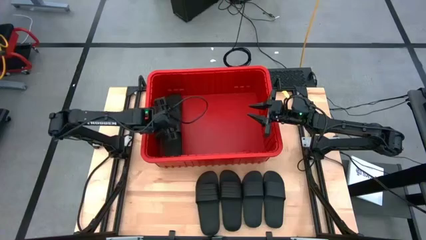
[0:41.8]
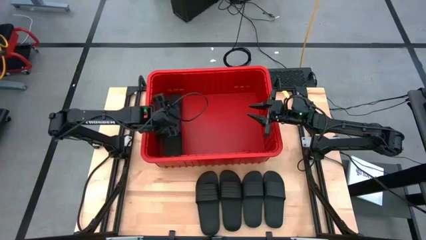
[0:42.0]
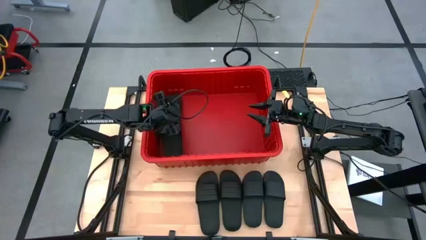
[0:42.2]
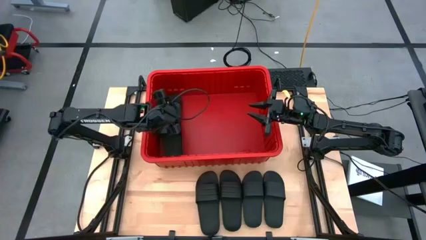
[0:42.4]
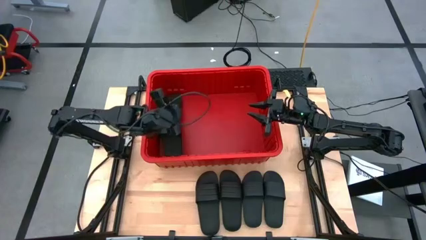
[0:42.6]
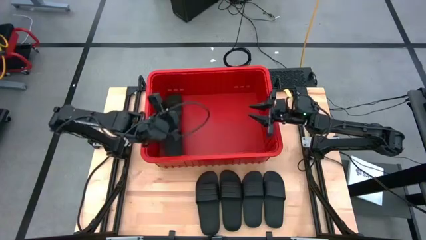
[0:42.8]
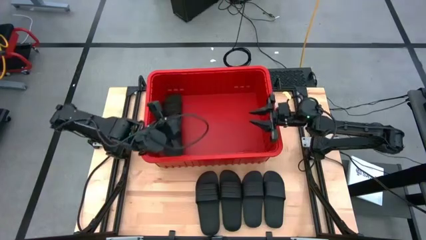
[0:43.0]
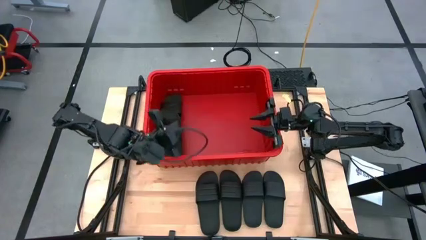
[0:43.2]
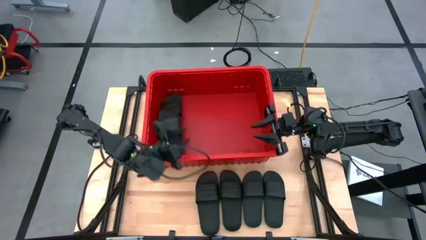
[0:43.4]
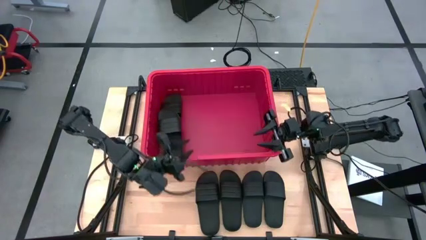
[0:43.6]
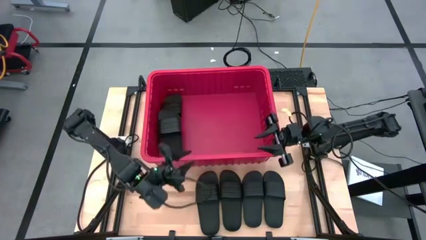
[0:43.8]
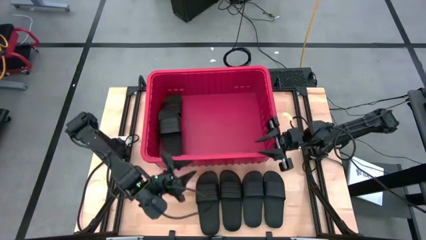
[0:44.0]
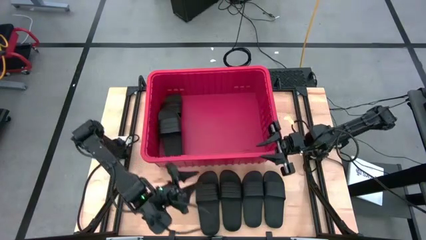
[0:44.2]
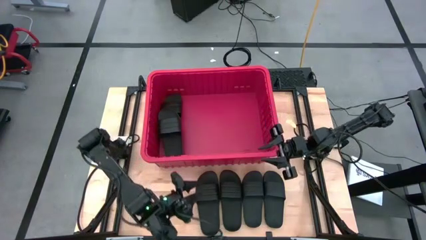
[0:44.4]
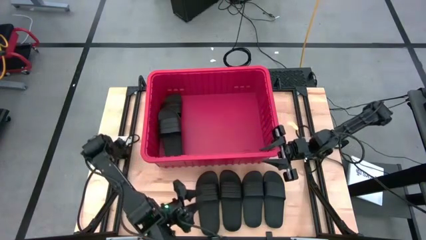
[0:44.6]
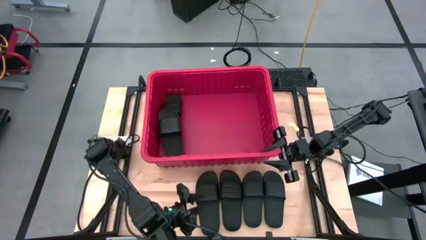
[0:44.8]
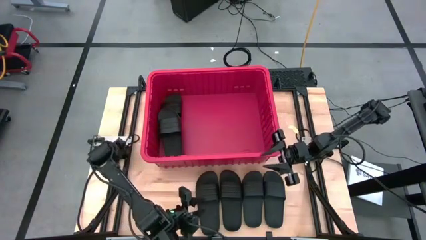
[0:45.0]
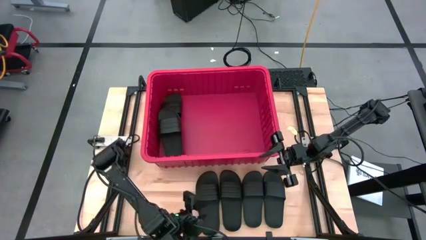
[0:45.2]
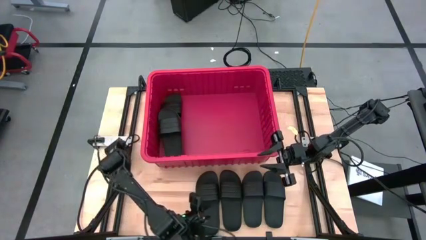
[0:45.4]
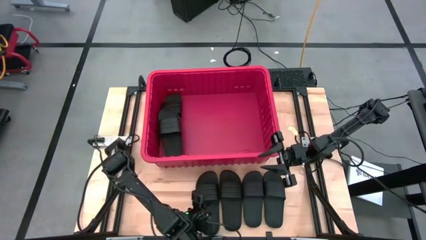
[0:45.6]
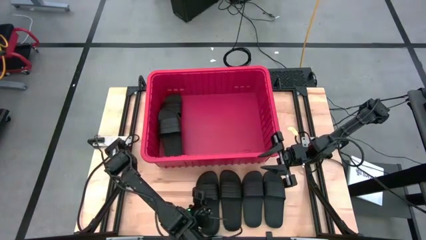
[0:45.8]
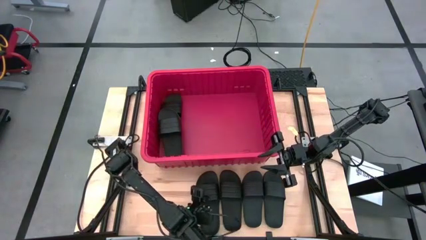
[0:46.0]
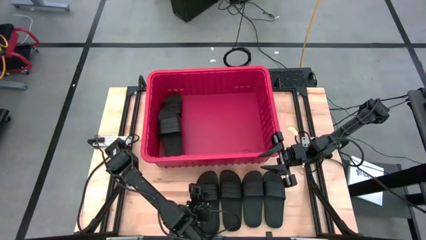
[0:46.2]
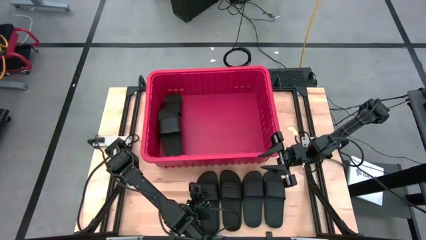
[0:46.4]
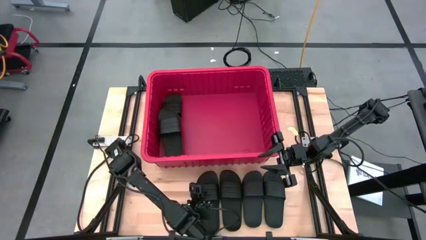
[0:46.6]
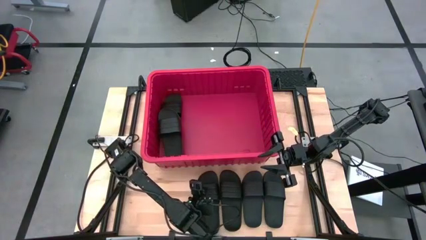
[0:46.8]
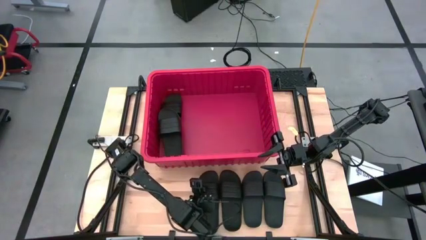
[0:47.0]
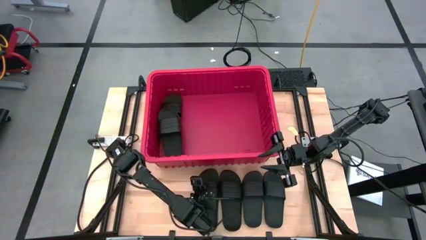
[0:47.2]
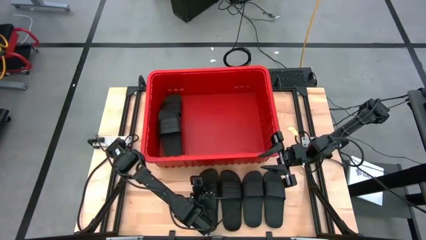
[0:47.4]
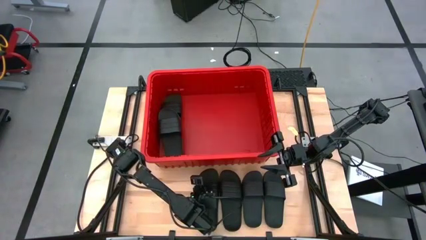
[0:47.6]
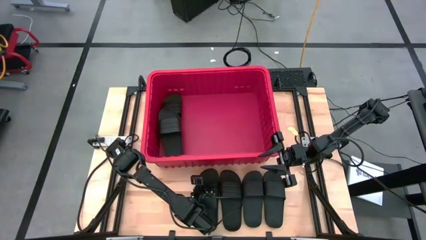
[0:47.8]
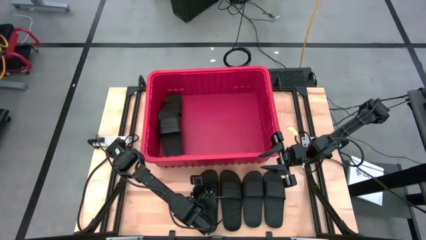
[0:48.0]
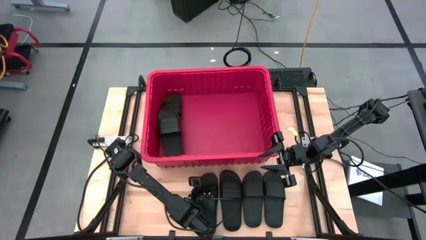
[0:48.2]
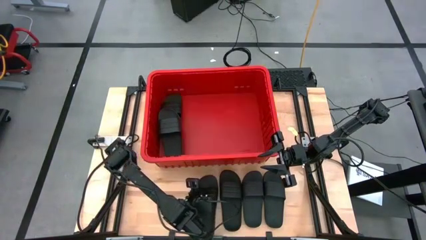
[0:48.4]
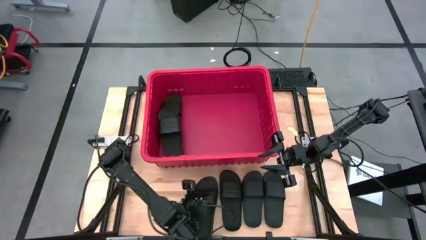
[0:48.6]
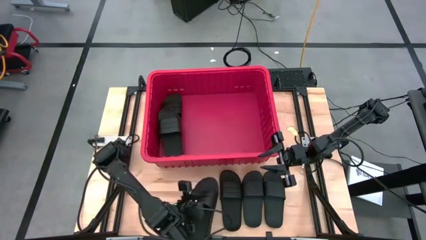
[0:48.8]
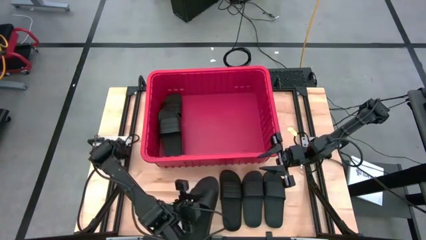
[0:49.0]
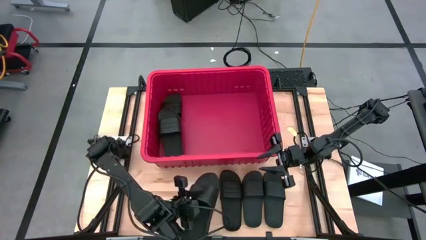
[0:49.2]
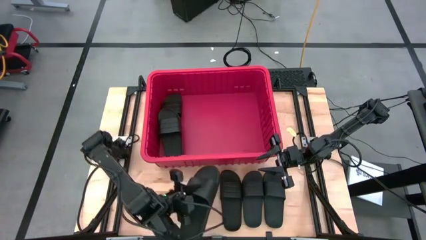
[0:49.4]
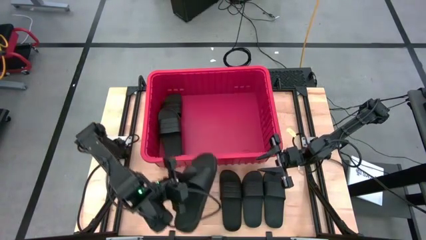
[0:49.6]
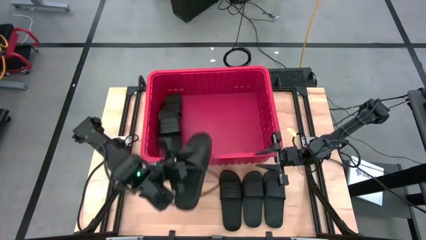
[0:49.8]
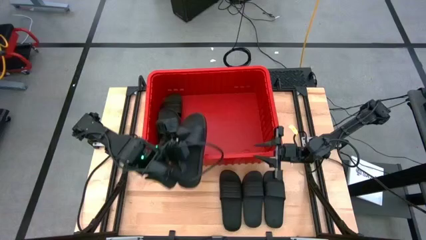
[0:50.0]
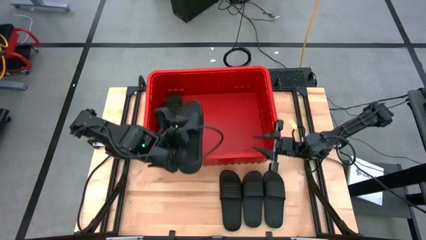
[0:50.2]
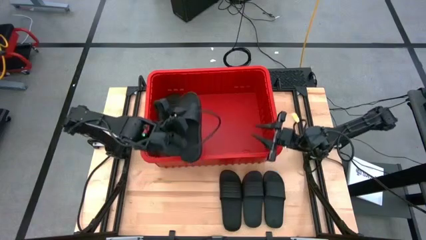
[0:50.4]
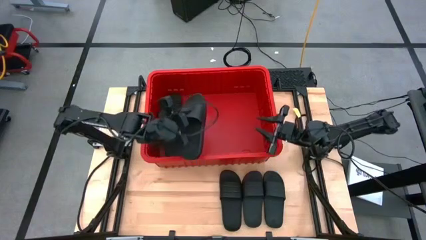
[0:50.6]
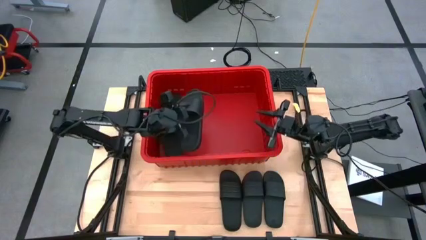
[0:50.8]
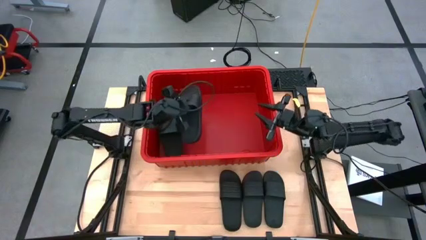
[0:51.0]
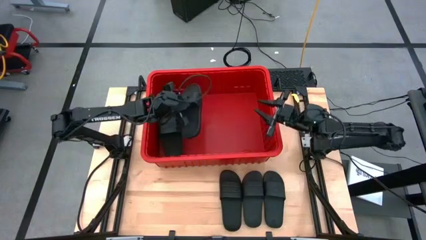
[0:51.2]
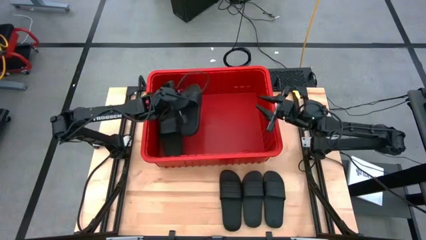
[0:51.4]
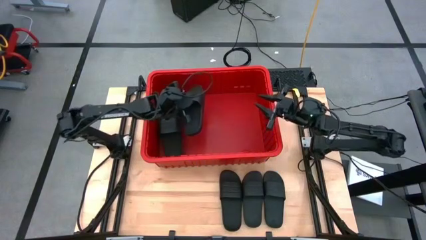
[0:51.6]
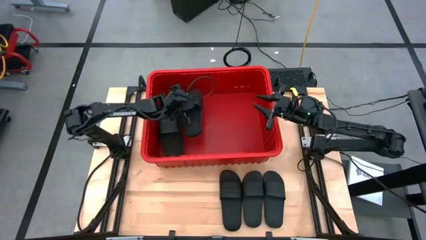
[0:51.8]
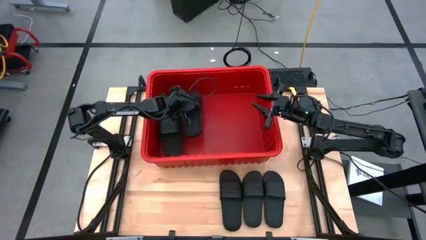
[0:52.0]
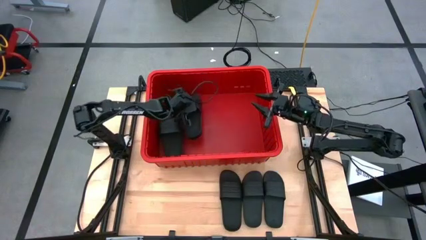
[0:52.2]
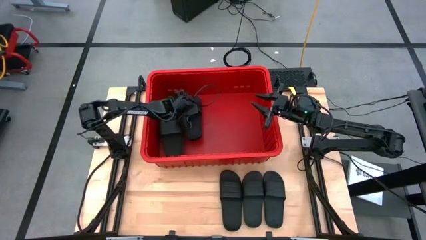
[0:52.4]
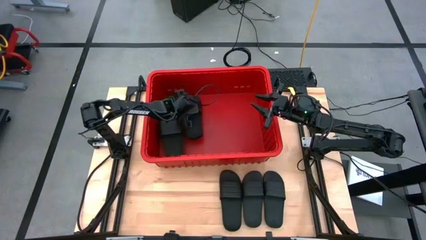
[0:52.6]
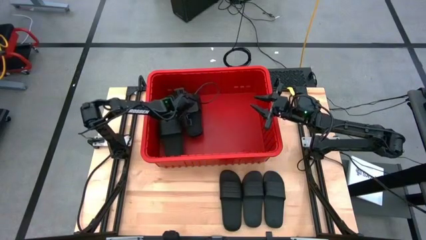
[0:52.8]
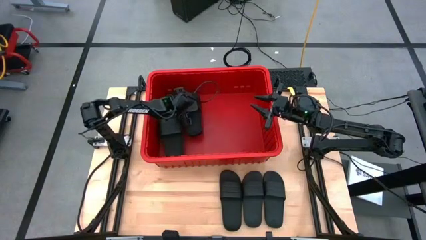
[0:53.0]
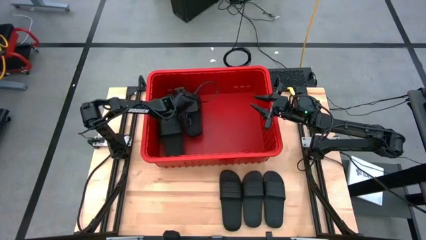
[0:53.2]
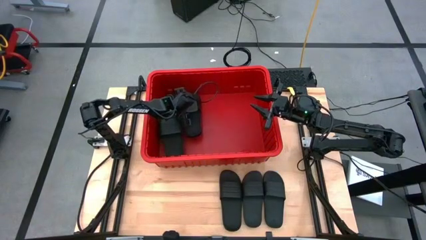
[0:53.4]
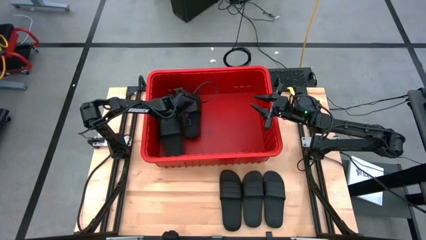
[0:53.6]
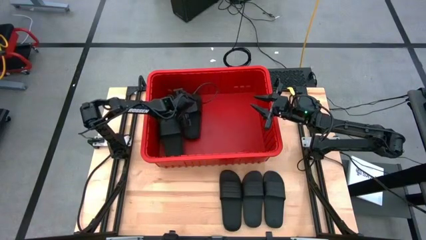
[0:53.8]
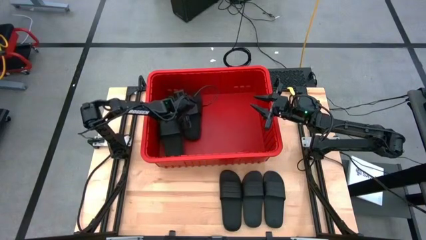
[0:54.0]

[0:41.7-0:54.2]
Task: Pick and place slides into bin
Put the black slide into the red bin
